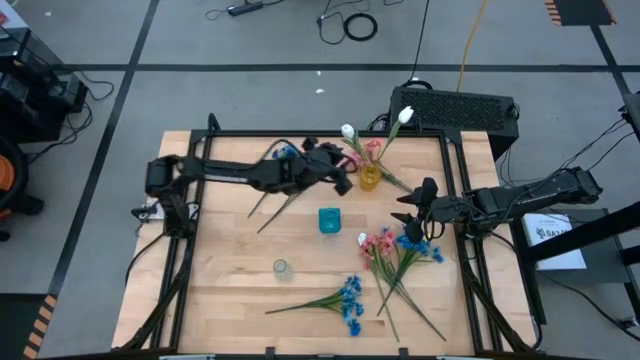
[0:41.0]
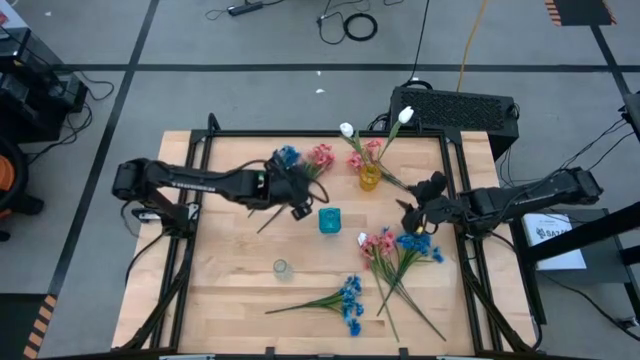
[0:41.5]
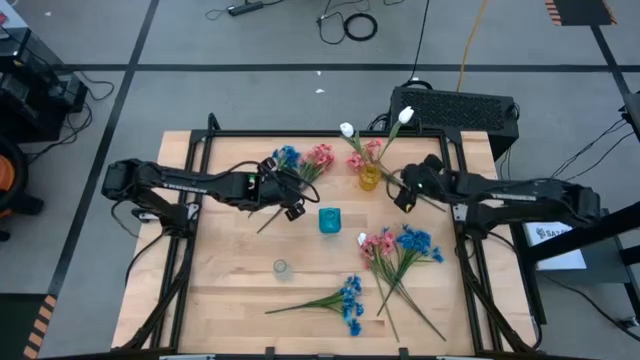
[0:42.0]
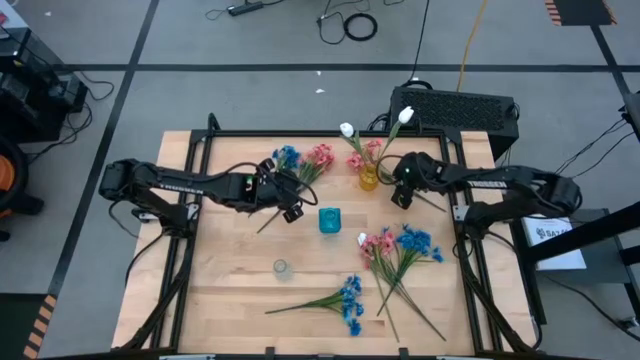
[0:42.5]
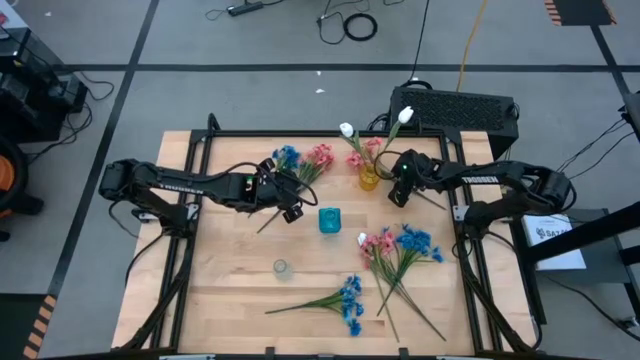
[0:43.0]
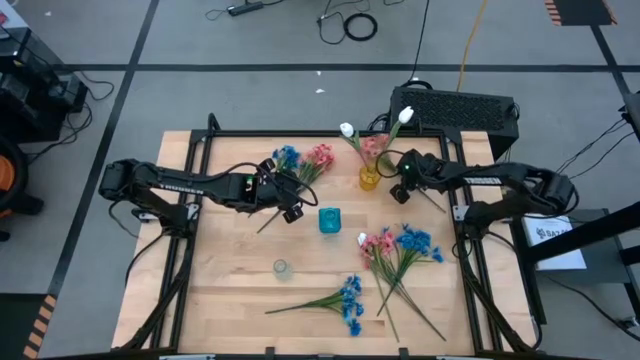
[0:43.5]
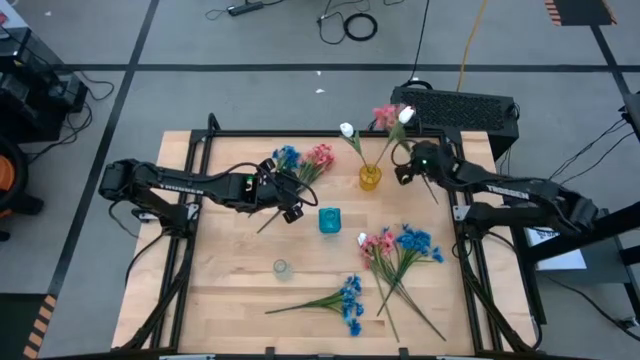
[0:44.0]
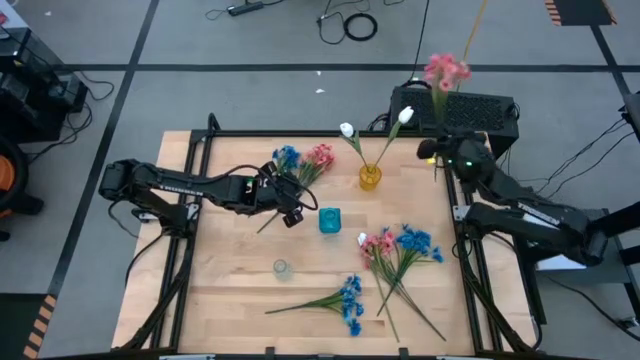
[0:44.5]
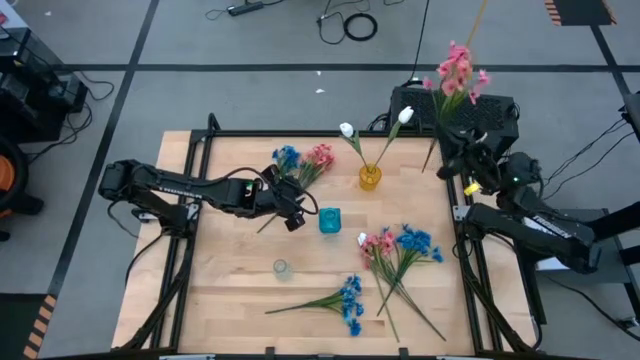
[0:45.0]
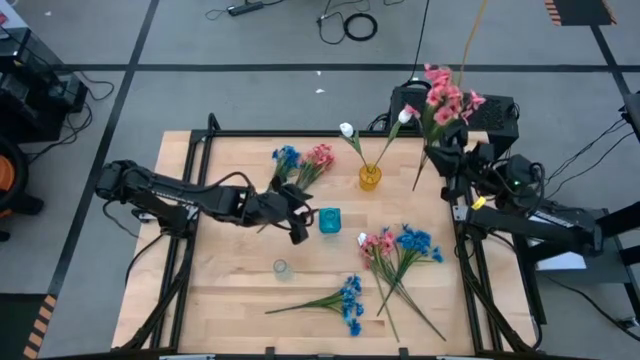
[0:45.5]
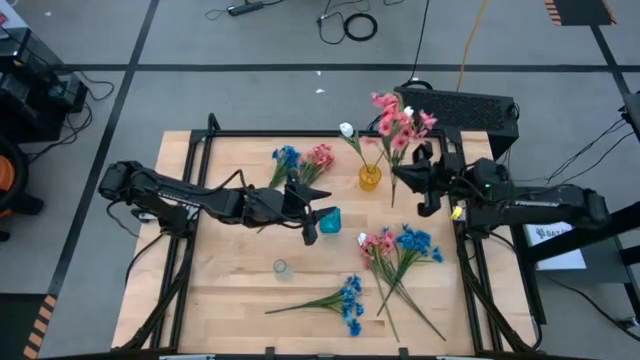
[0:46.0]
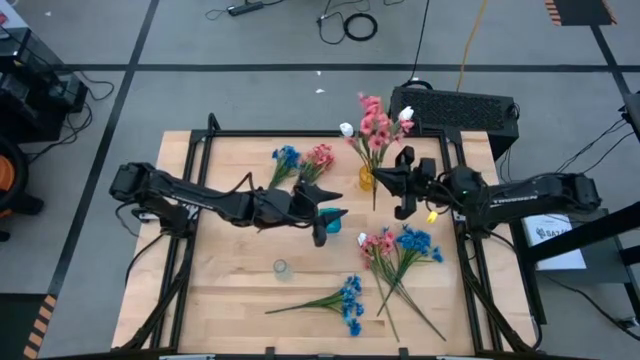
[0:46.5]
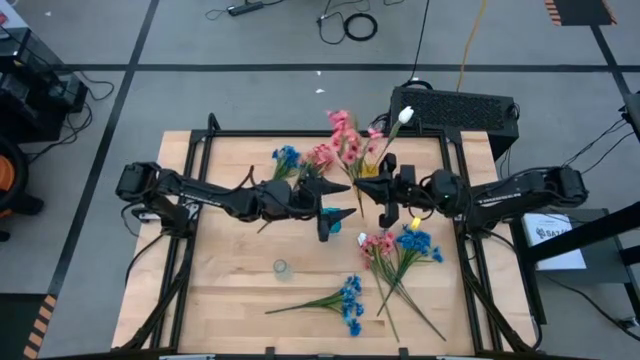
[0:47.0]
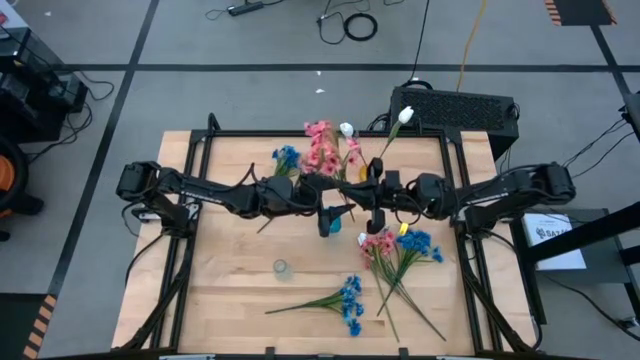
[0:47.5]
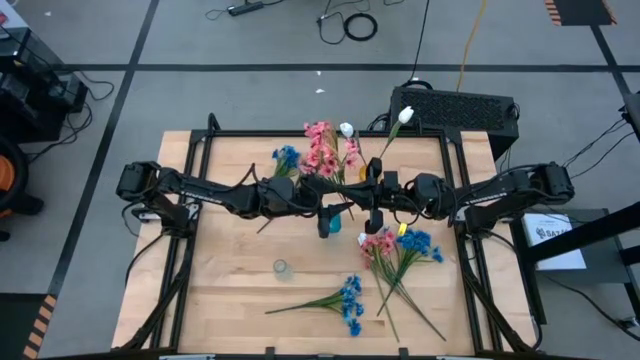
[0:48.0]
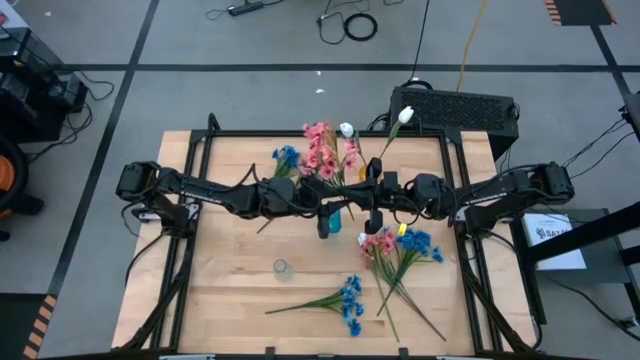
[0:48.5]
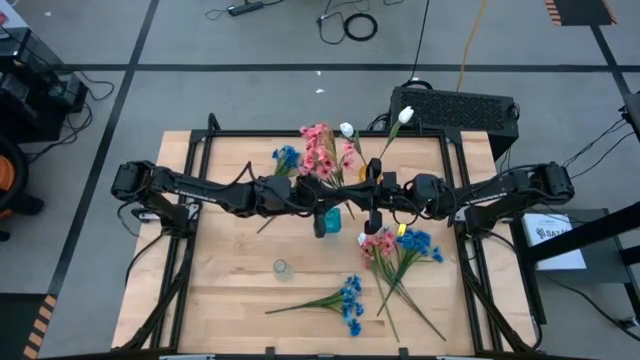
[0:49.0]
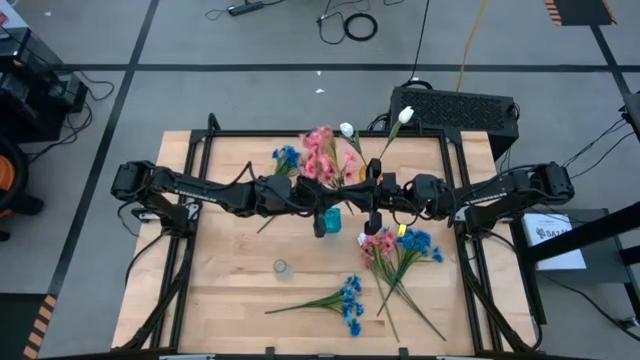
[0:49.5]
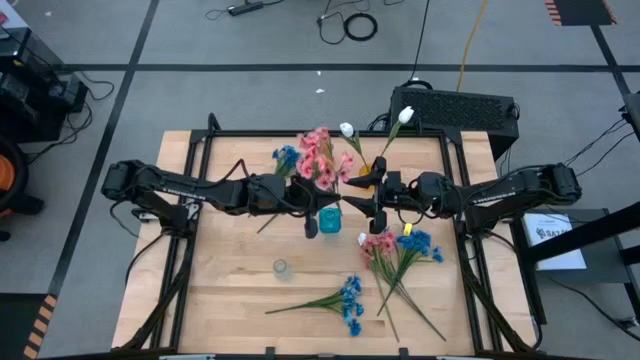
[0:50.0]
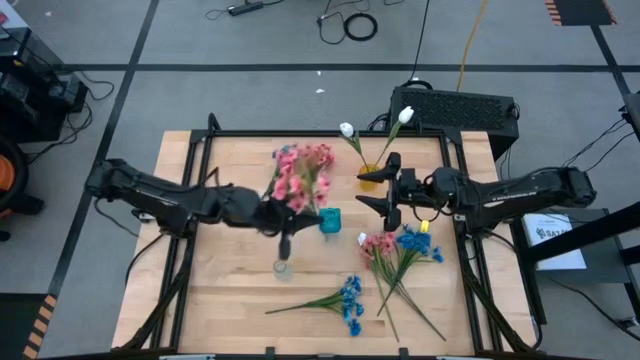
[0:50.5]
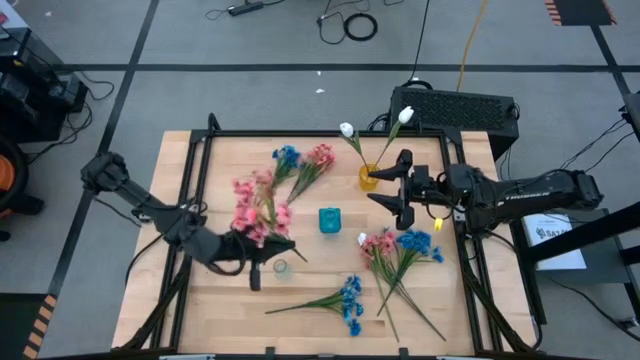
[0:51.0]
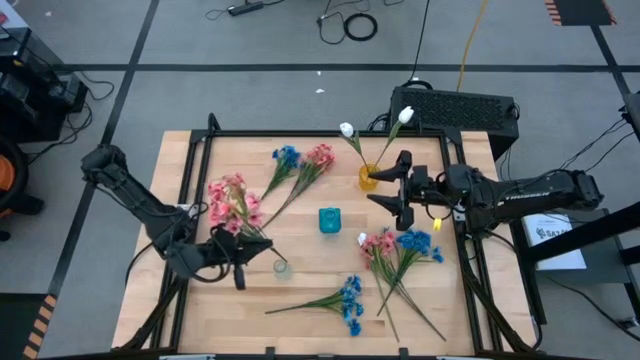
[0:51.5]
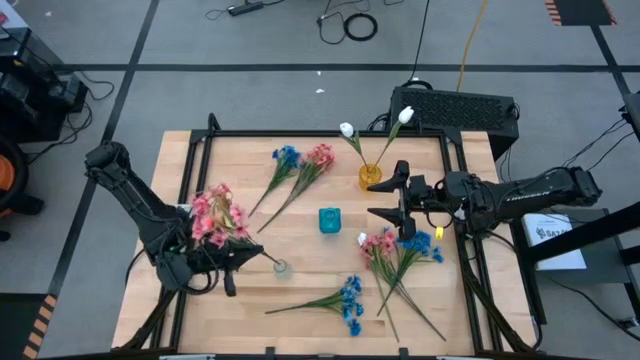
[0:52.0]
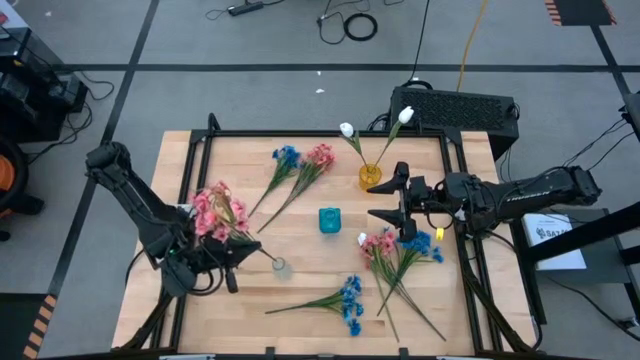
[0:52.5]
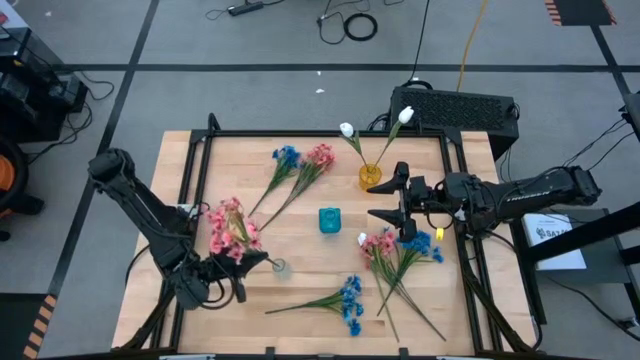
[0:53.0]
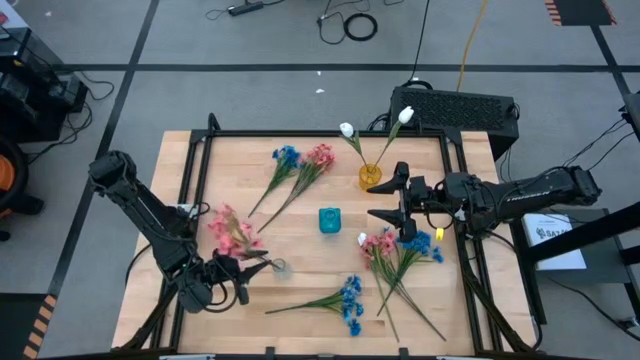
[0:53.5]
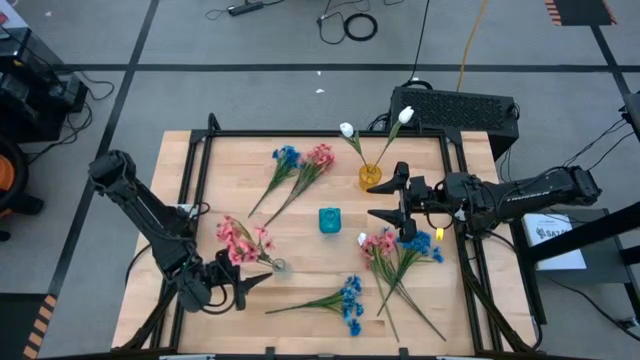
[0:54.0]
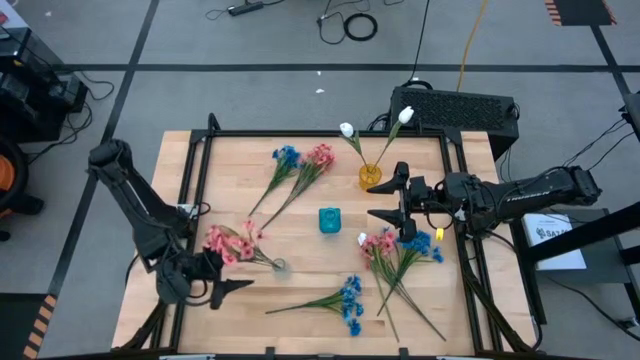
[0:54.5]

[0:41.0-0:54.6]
Task: Sort flowers into vase by color
Put the top right pink flowers into the transparent vase

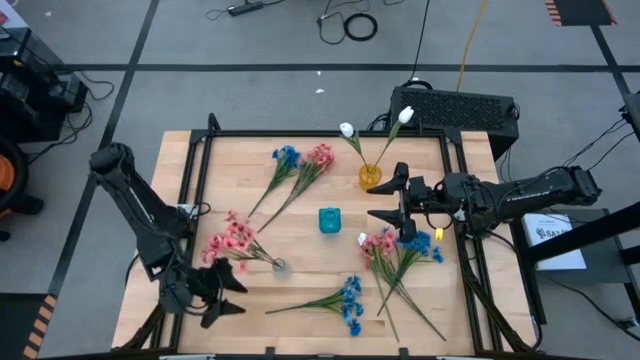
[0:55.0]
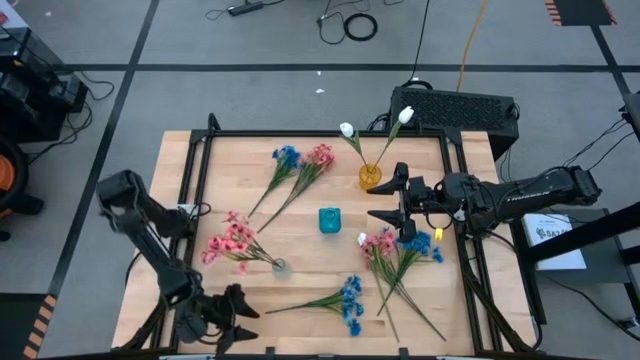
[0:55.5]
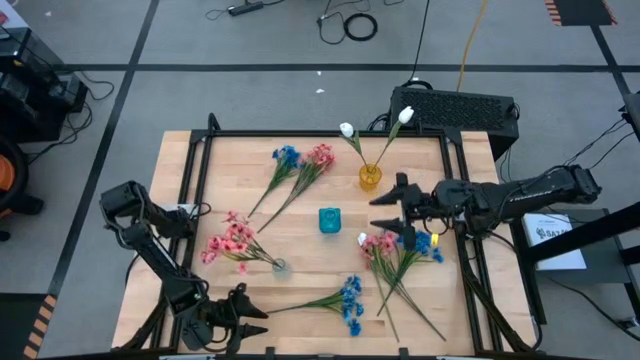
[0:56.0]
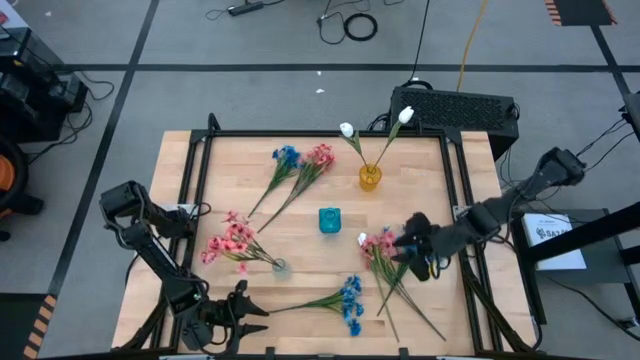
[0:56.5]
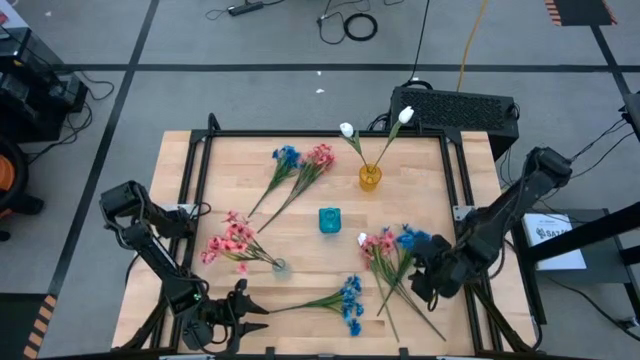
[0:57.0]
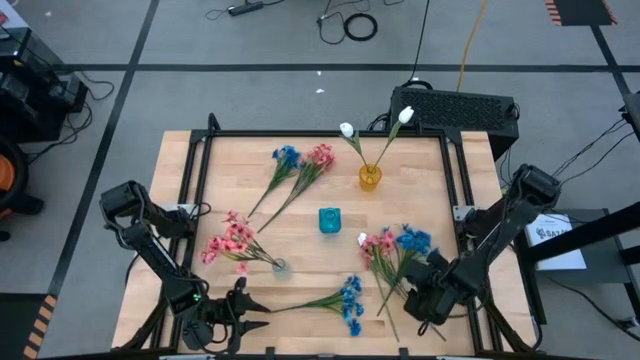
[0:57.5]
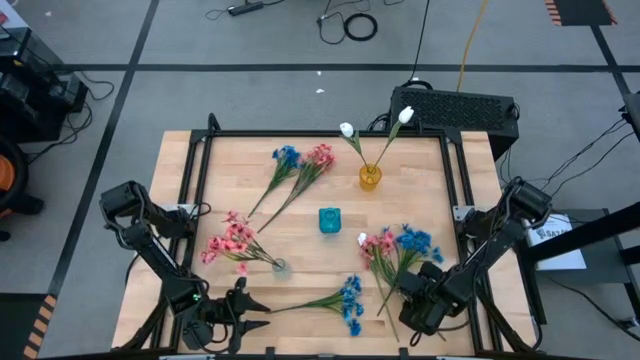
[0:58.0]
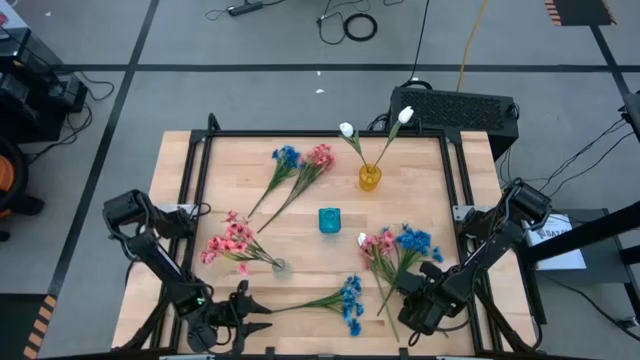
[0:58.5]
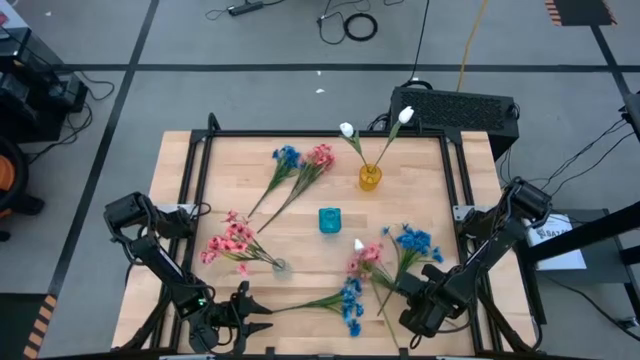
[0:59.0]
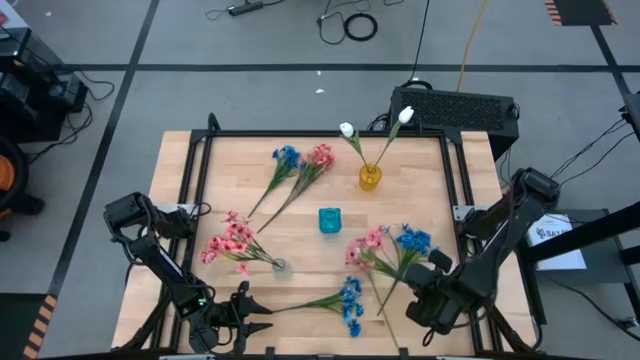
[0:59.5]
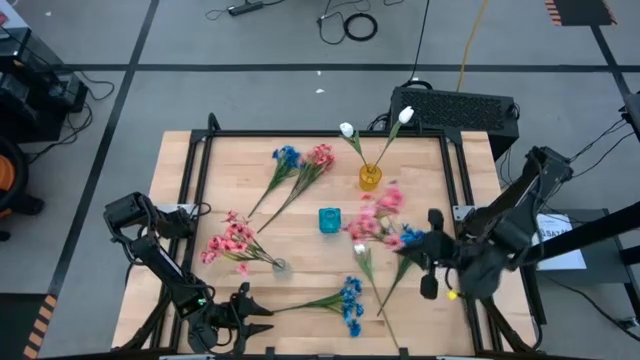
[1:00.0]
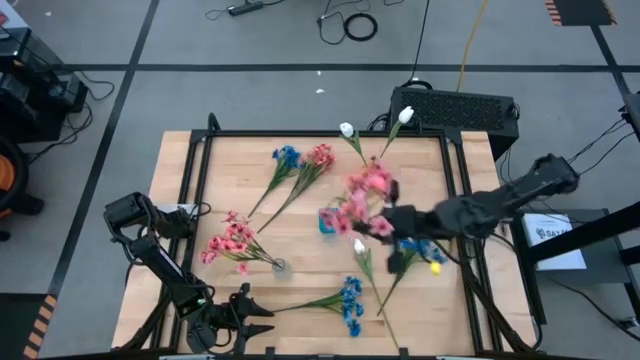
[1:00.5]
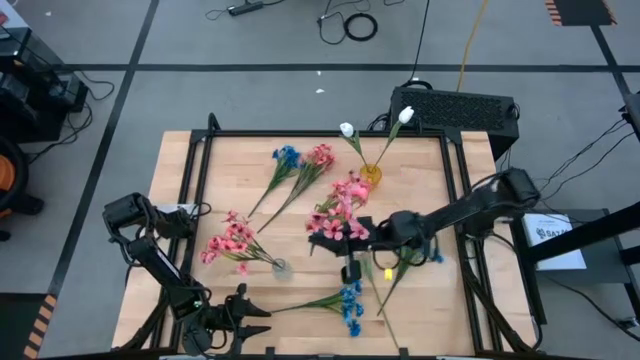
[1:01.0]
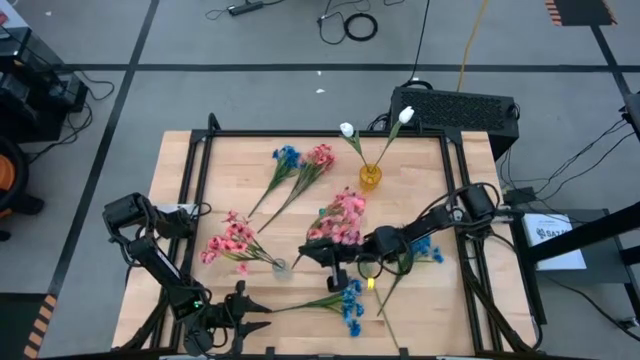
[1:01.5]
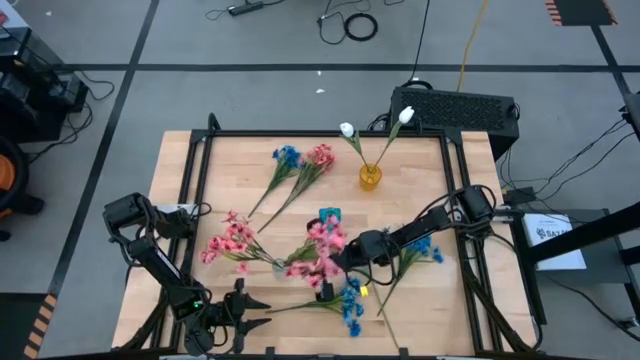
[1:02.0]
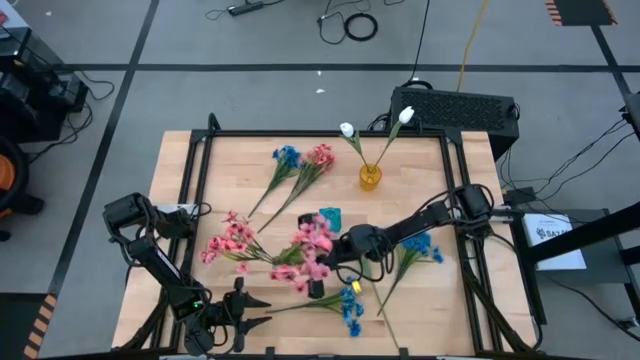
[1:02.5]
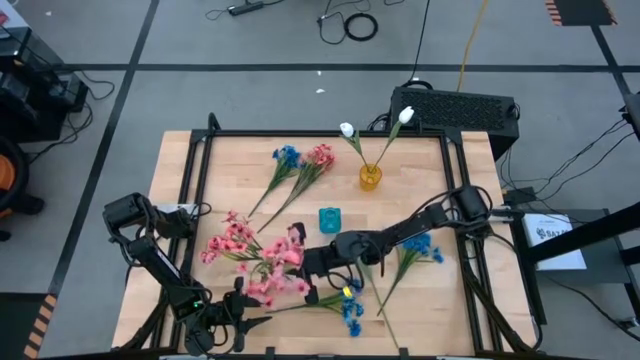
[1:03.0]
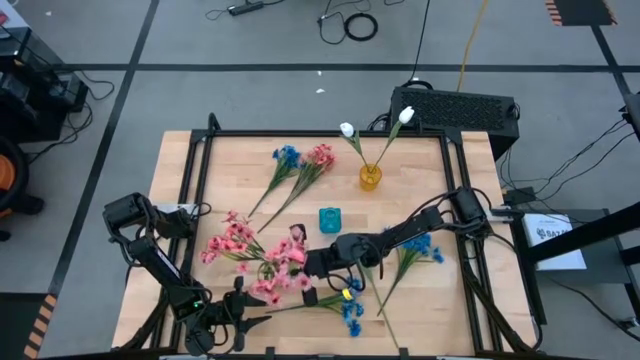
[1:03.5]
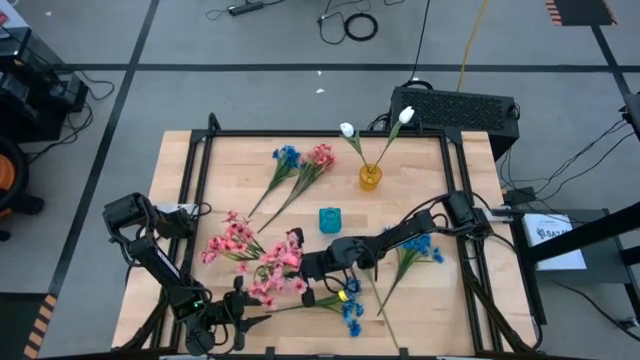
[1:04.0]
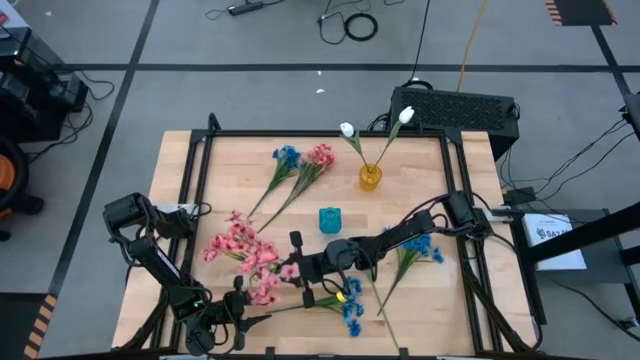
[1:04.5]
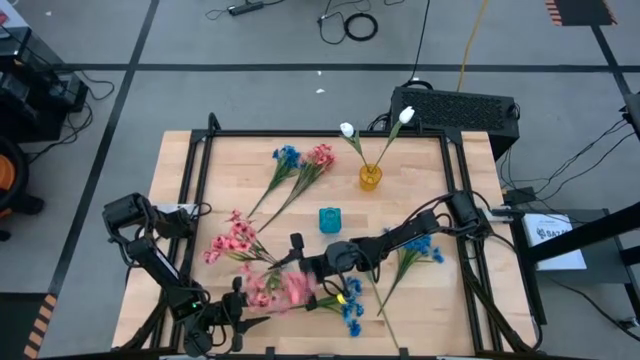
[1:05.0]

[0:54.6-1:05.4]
Put the bottom pink flowers into the transparent vase
